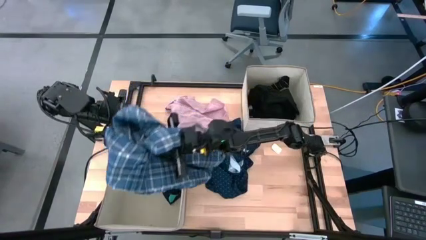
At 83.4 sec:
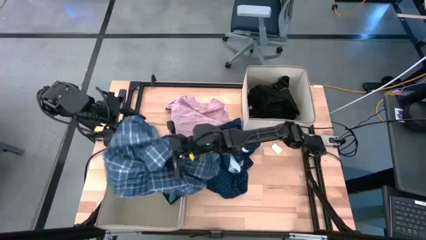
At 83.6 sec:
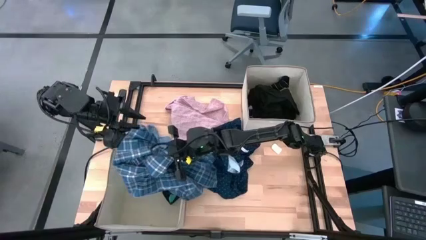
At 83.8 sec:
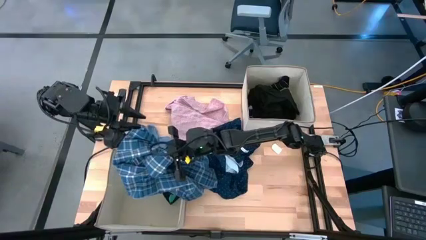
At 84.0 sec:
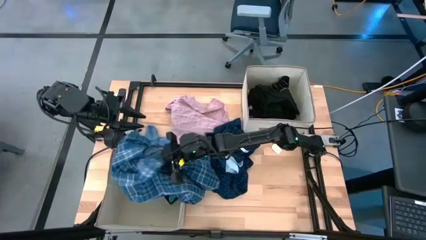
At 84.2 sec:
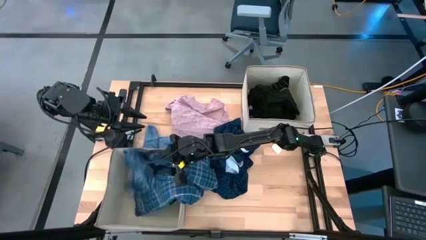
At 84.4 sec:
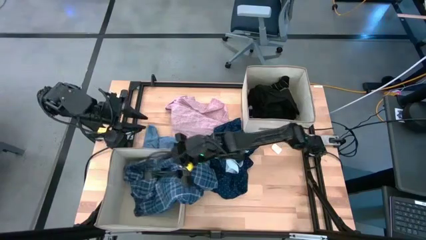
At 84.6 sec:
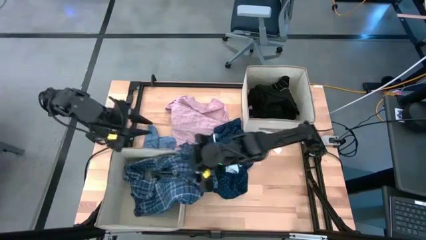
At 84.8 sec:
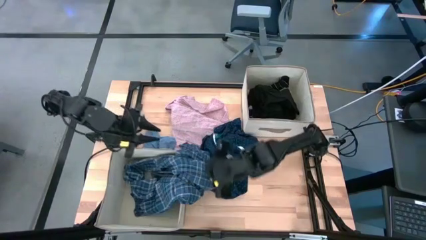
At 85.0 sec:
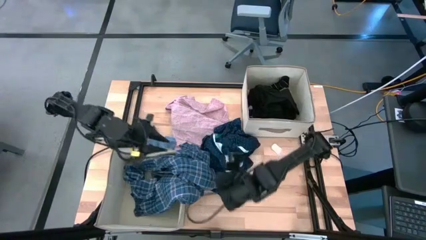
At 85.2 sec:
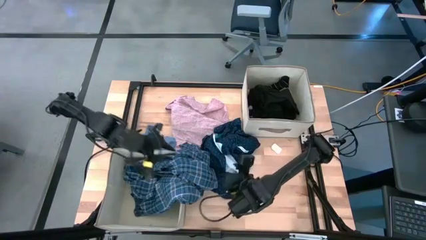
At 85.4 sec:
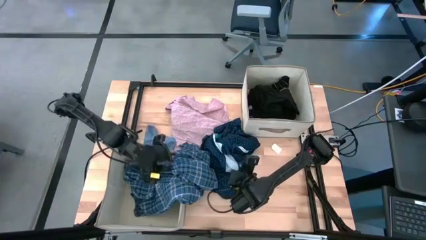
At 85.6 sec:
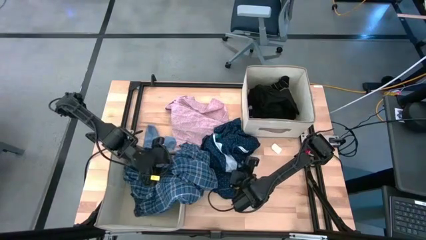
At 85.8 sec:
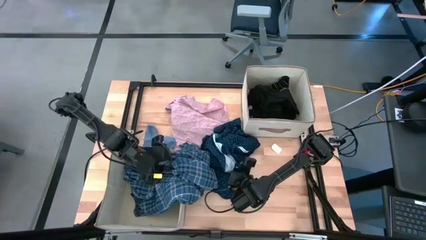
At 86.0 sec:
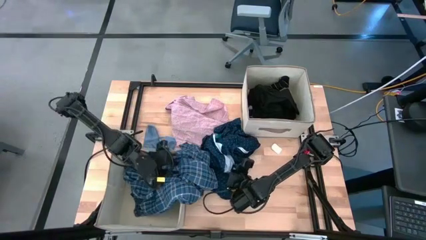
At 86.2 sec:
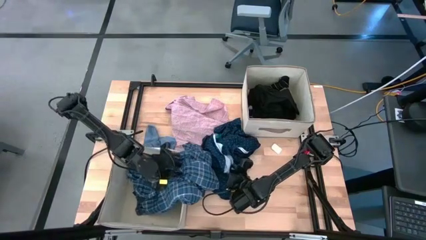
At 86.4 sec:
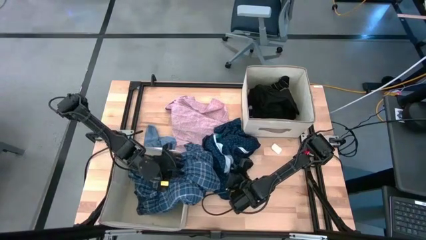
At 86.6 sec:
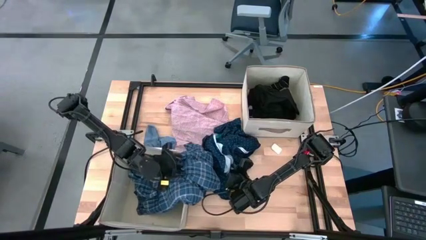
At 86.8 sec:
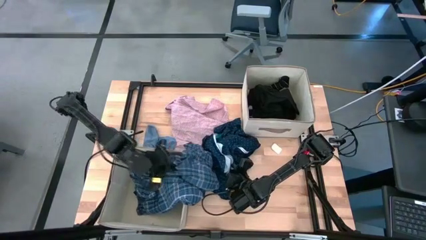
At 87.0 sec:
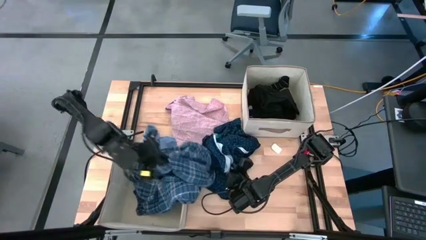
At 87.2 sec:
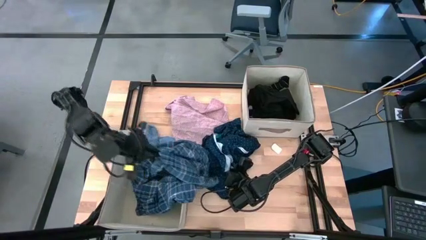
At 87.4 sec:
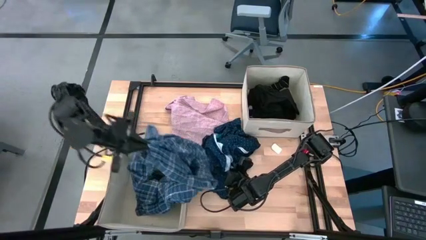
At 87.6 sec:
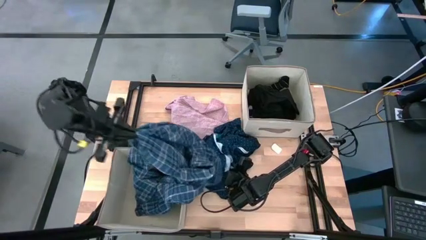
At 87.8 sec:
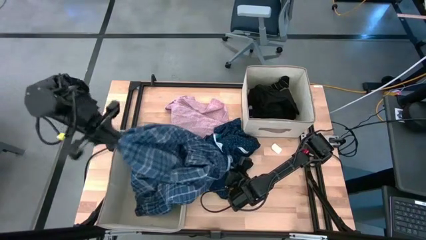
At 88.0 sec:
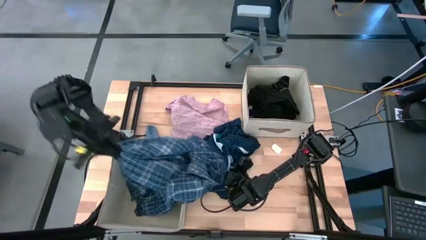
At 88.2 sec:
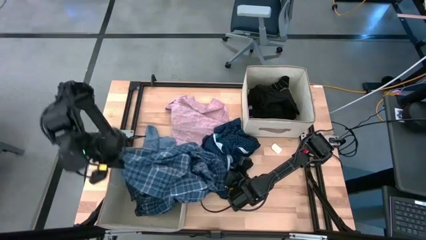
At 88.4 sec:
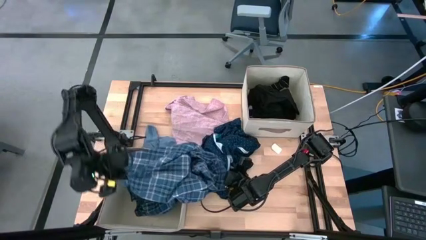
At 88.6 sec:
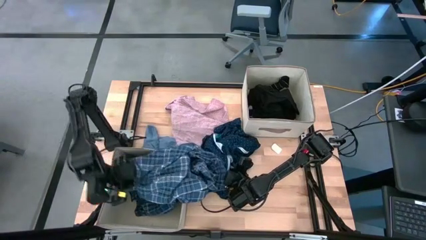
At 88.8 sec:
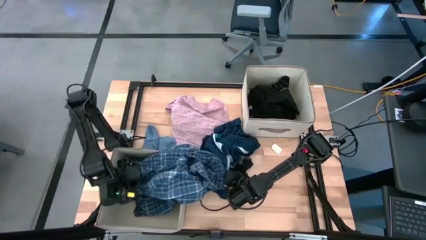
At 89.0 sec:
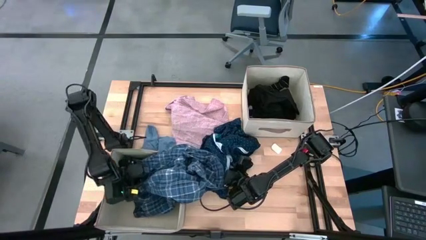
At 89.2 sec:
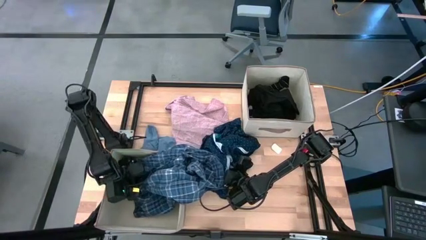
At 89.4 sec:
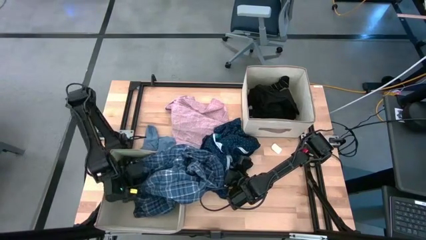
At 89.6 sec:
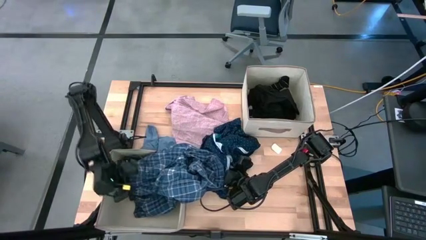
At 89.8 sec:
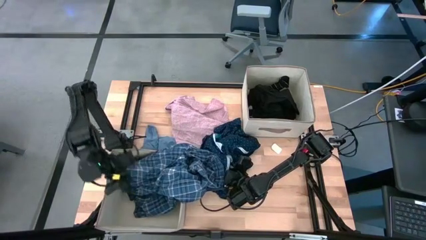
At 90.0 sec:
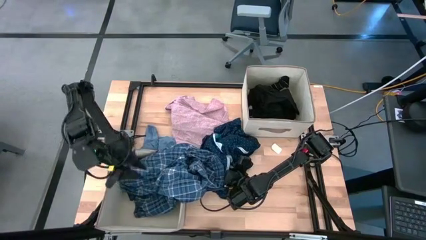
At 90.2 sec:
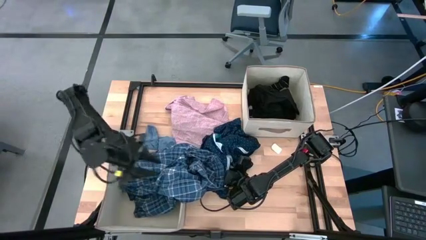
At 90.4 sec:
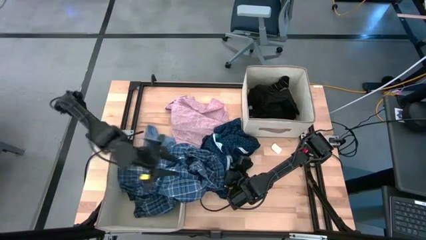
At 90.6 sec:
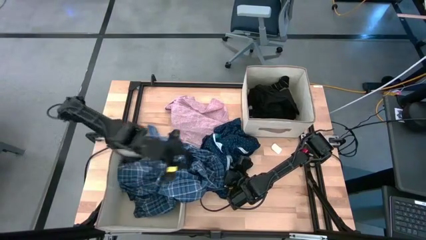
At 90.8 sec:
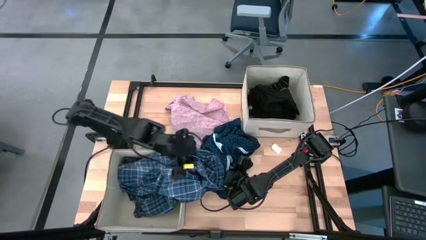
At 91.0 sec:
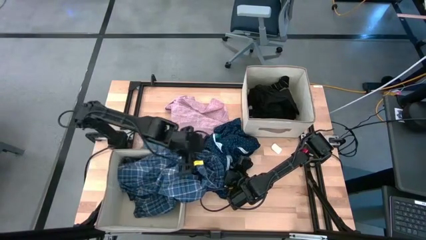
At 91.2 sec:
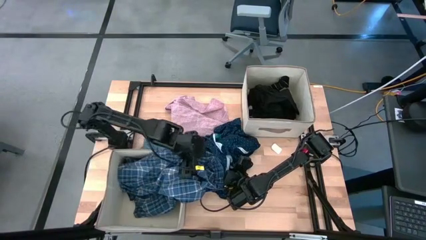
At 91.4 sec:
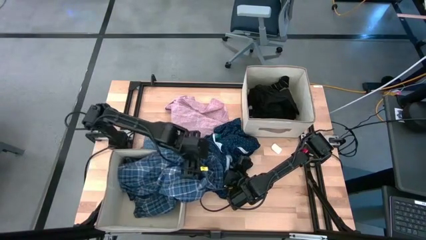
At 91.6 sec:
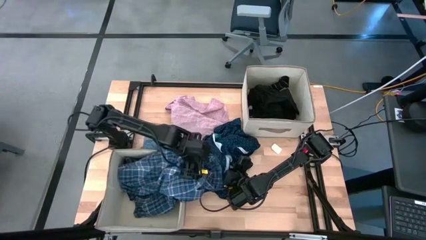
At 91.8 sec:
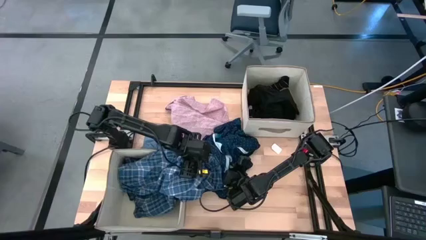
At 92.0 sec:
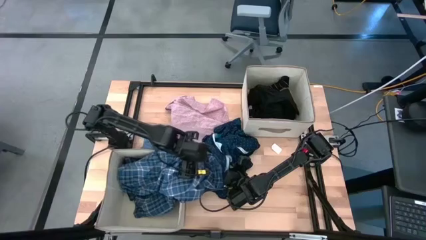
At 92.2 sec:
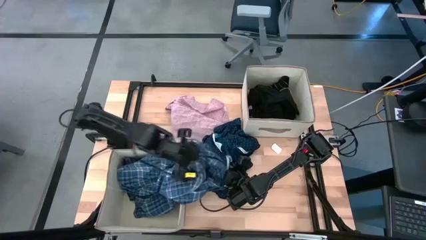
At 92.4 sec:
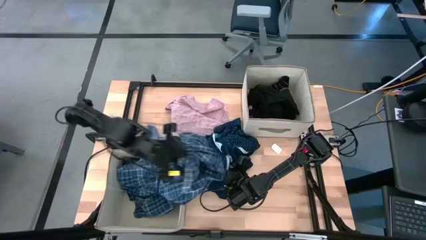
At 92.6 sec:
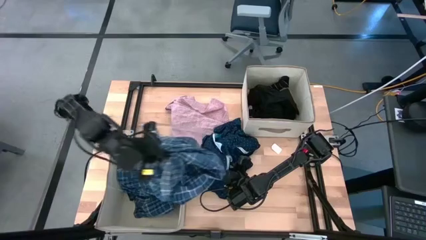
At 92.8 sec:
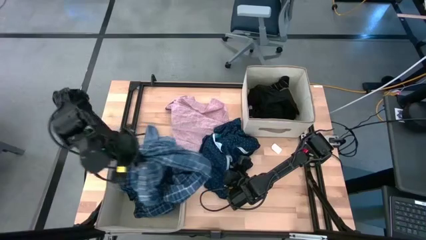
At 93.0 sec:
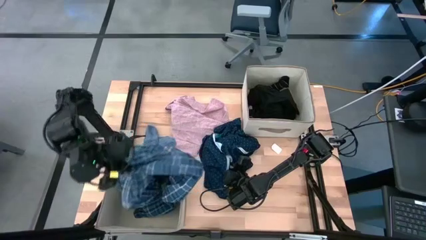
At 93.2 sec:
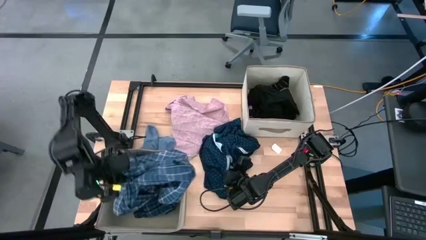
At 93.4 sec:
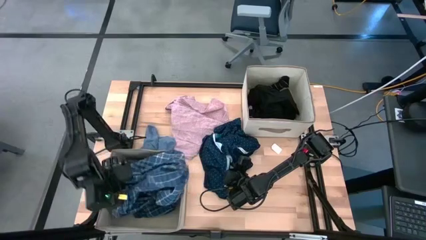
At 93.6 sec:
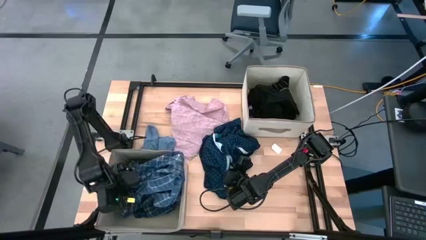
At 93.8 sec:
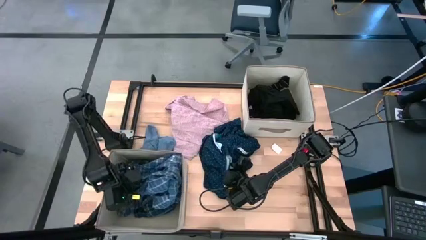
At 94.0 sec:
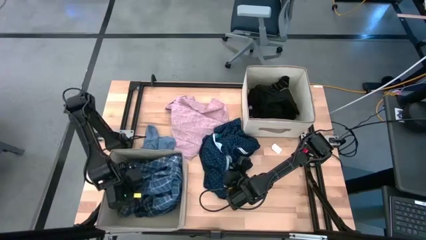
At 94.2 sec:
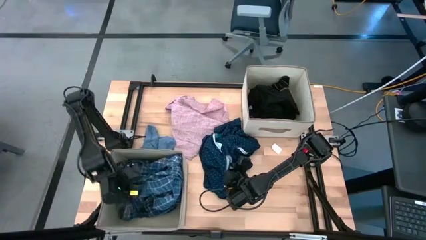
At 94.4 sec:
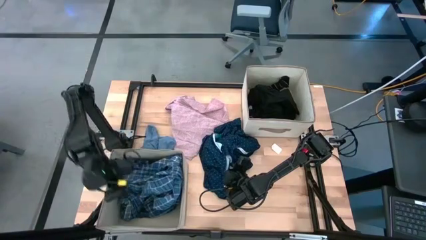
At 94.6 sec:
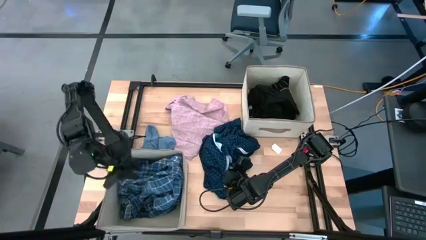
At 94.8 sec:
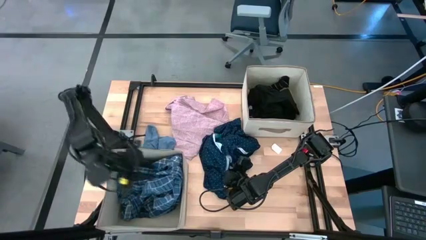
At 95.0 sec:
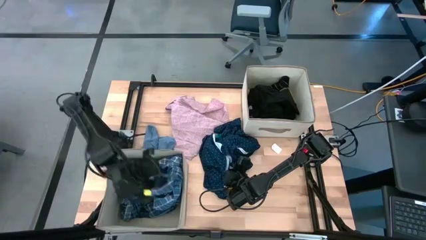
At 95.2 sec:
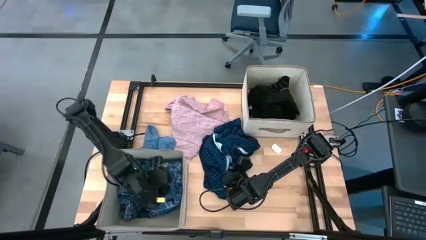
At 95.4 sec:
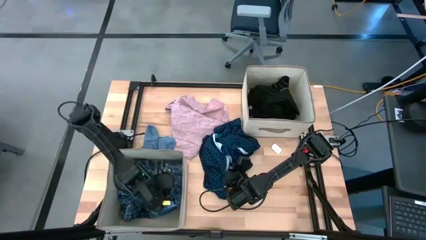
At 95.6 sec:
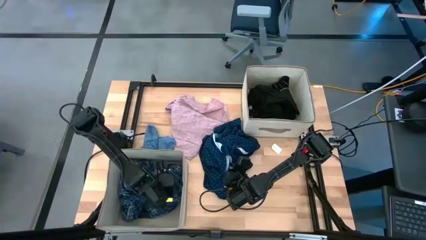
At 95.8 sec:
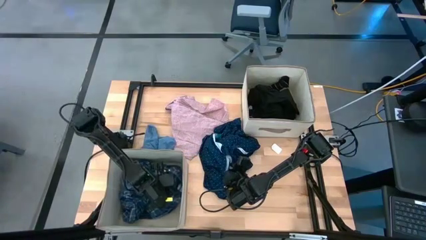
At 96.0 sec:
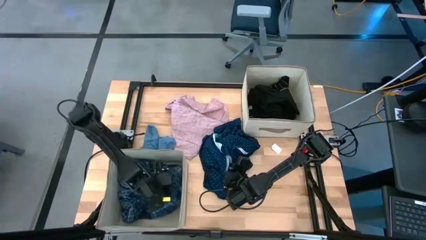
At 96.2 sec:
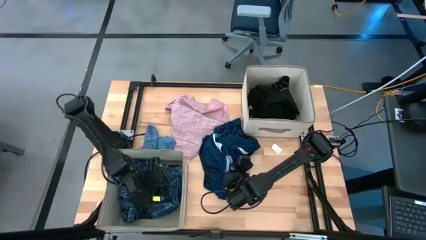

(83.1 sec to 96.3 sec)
Task: Sort clothes
Put the blue checkered shirt into the bottom white laundry organizer

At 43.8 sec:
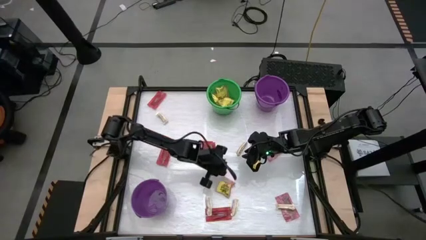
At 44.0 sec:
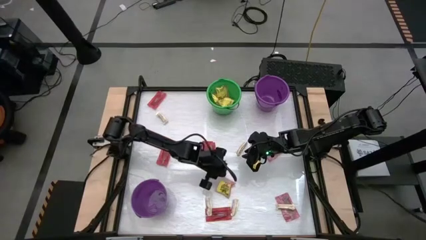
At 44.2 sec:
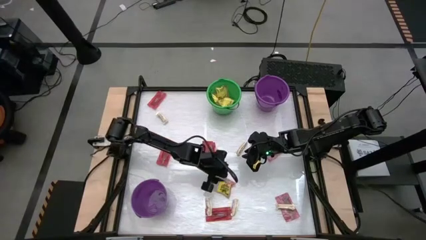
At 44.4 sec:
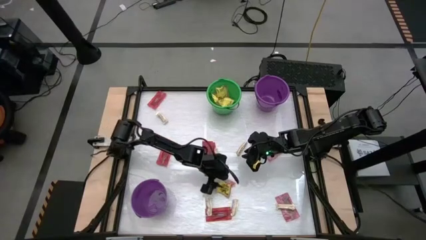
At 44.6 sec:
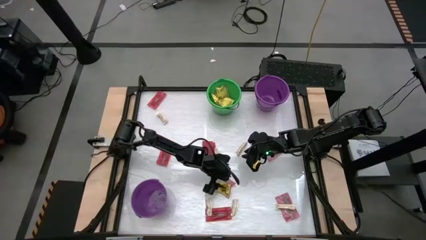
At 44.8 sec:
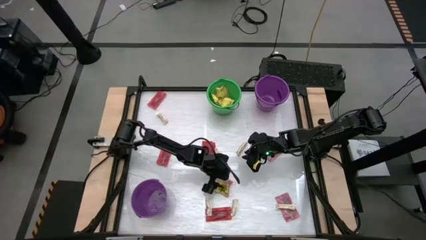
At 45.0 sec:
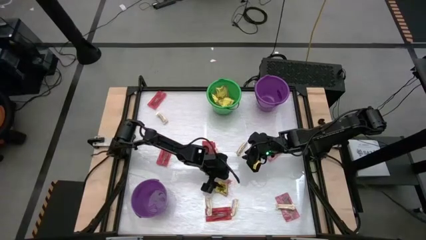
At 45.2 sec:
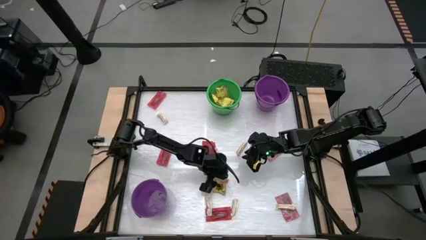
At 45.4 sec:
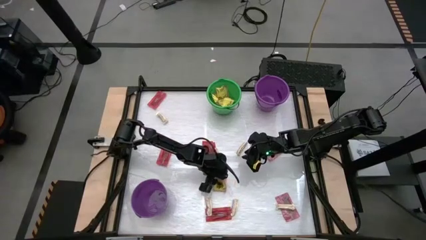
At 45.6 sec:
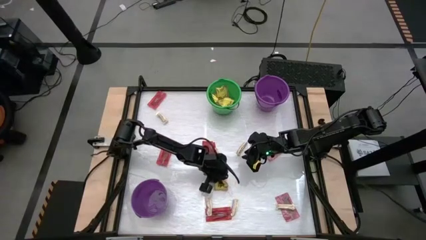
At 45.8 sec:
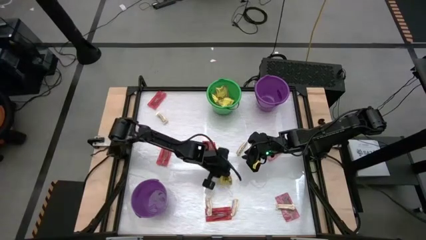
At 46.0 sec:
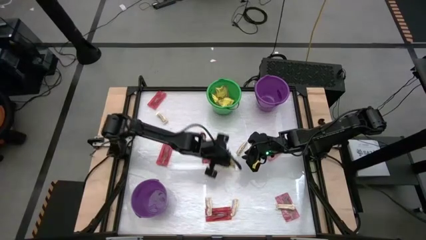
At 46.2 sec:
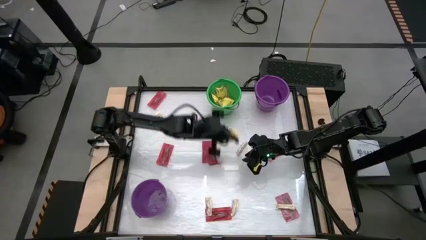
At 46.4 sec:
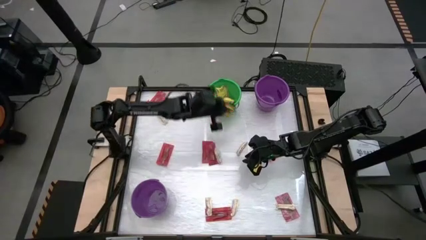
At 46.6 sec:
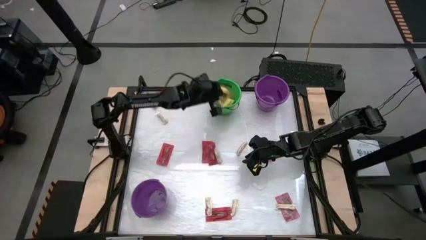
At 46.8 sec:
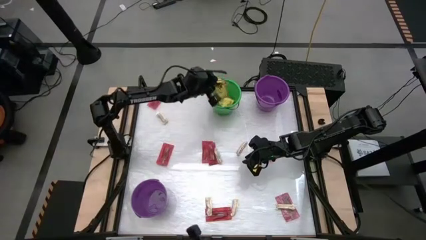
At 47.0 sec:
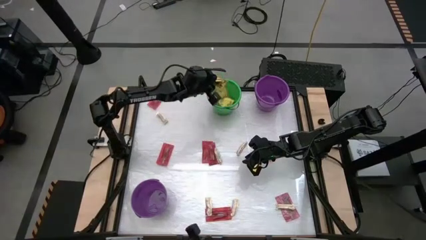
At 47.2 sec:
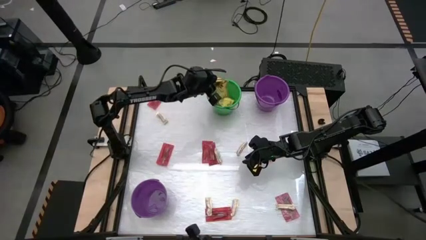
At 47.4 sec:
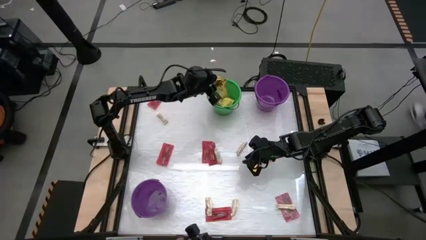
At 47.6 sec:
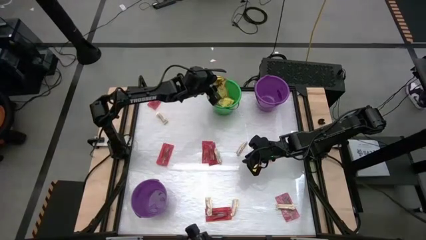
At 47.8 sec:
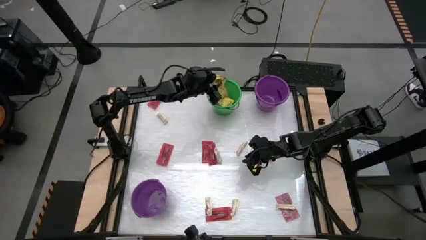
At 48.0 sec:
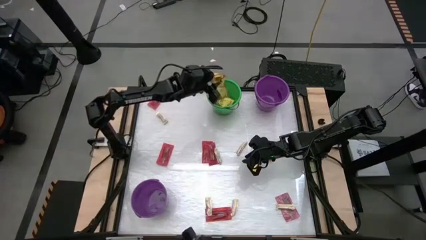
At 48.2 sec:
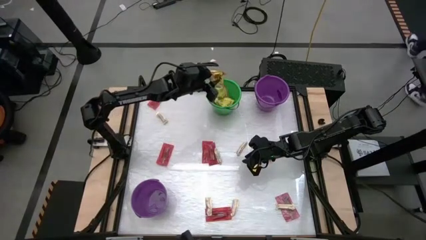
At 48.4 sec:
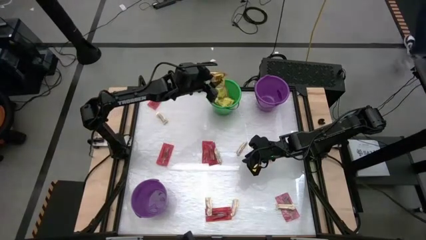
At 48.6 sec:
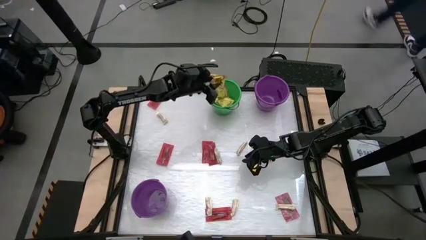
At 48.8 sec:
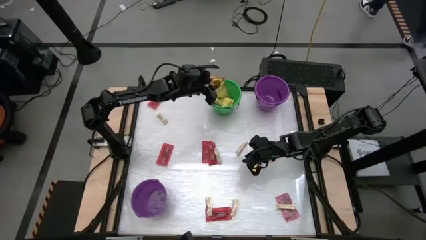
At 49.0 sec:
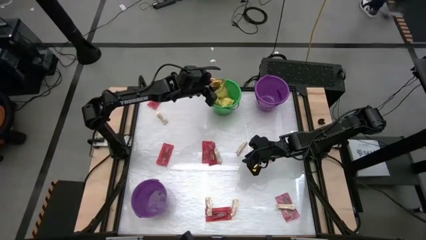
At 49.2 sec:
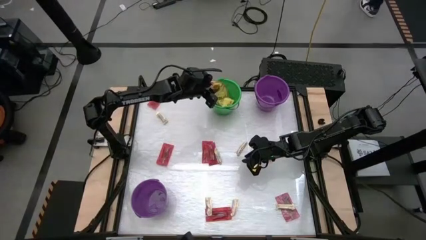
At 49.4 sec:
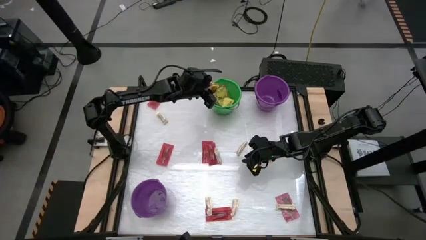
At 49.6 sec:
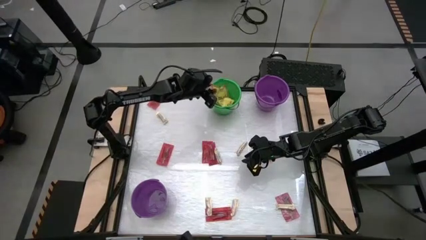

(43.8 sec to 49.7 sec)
Task: Sort candy by brand, put in halloween buckets
Put the yellow candy into the green bucket
